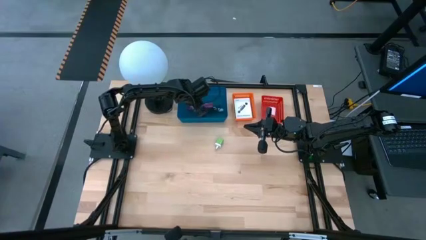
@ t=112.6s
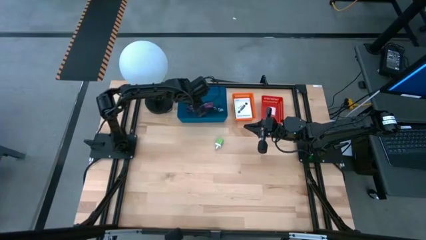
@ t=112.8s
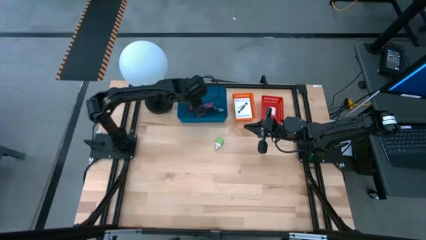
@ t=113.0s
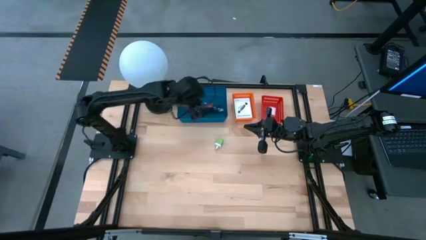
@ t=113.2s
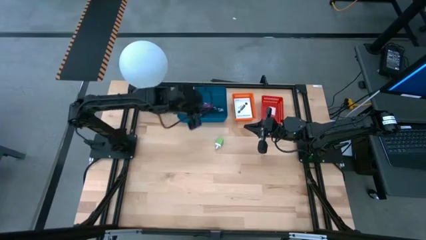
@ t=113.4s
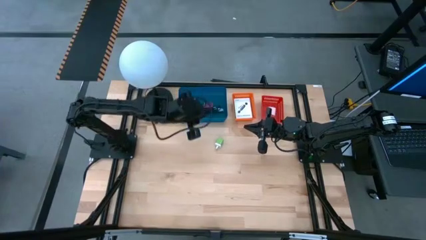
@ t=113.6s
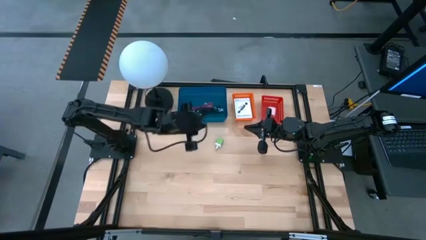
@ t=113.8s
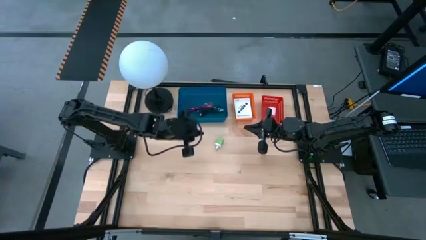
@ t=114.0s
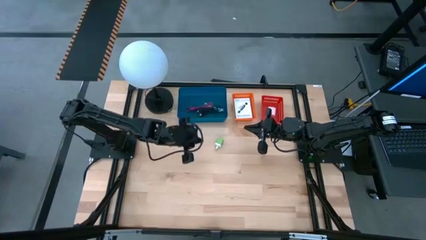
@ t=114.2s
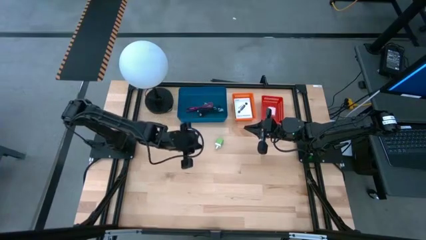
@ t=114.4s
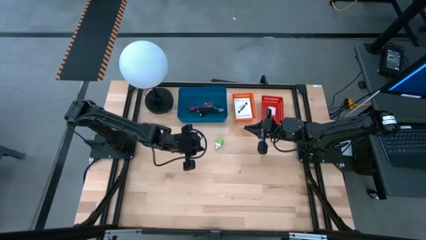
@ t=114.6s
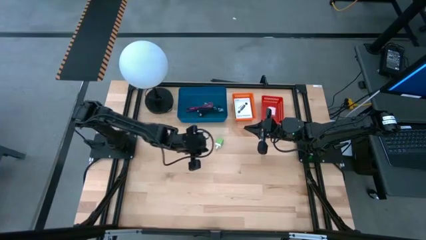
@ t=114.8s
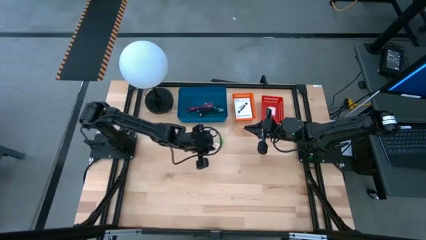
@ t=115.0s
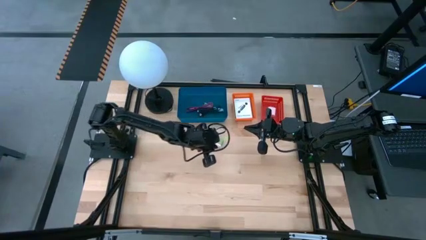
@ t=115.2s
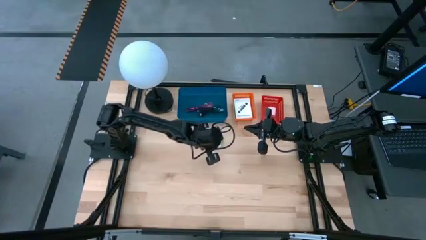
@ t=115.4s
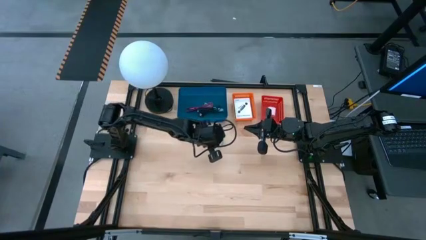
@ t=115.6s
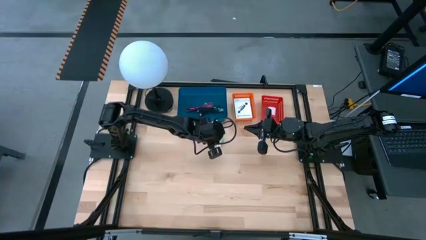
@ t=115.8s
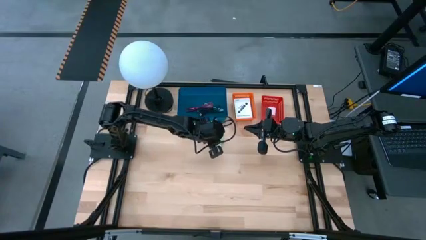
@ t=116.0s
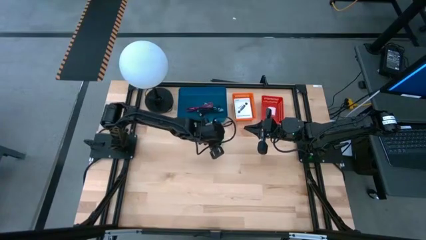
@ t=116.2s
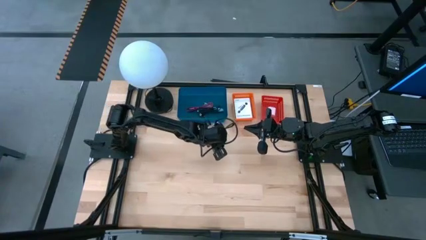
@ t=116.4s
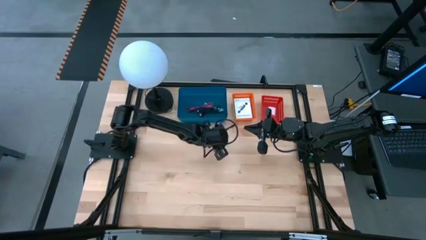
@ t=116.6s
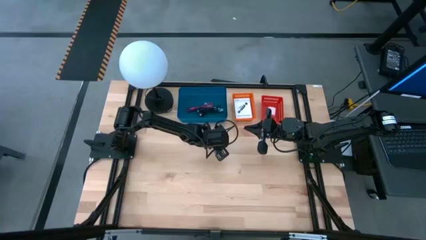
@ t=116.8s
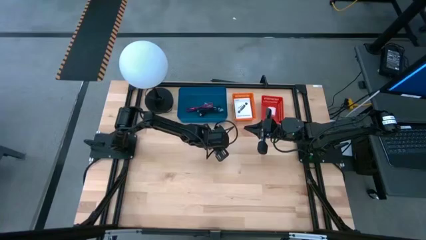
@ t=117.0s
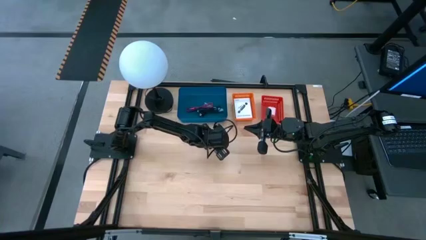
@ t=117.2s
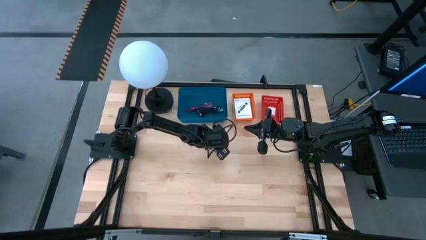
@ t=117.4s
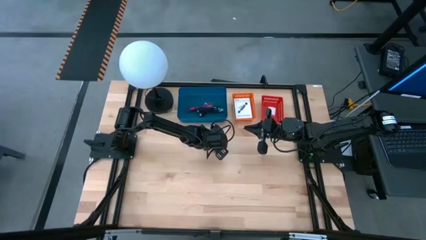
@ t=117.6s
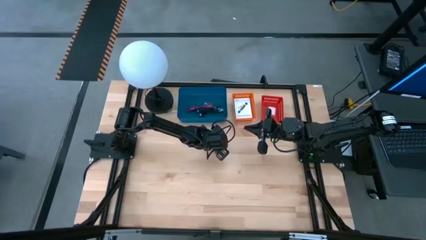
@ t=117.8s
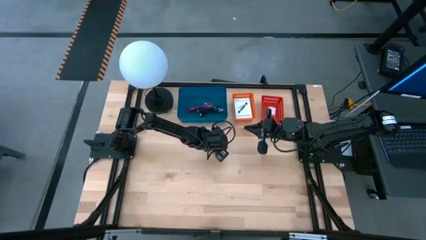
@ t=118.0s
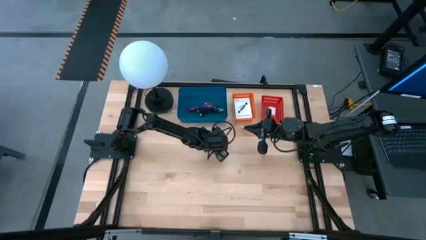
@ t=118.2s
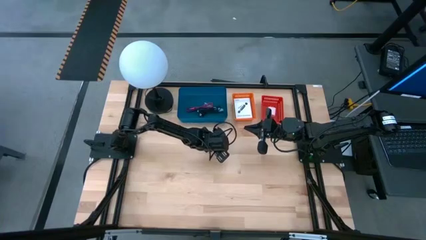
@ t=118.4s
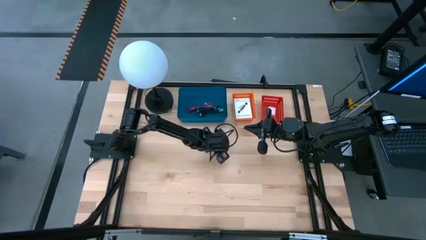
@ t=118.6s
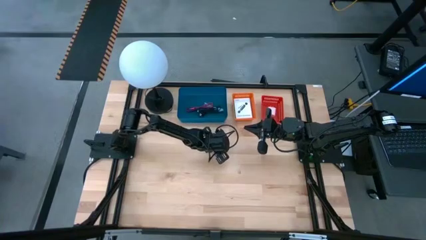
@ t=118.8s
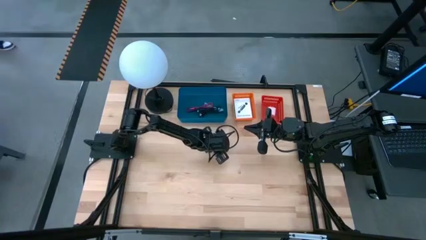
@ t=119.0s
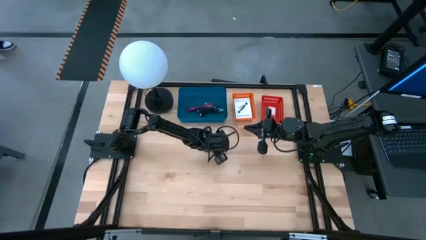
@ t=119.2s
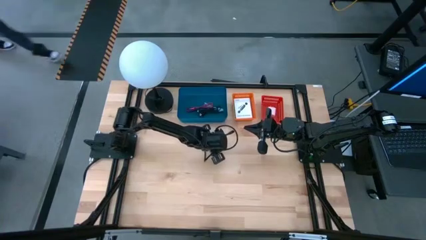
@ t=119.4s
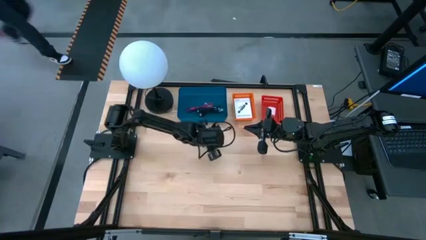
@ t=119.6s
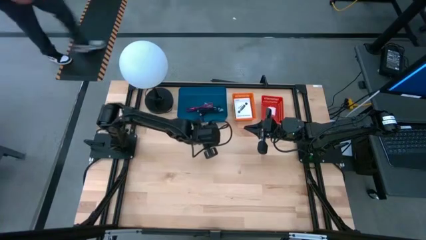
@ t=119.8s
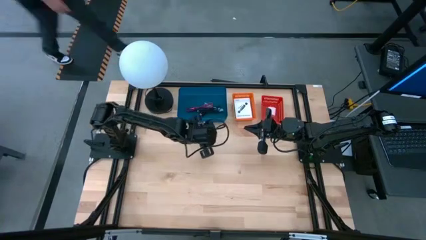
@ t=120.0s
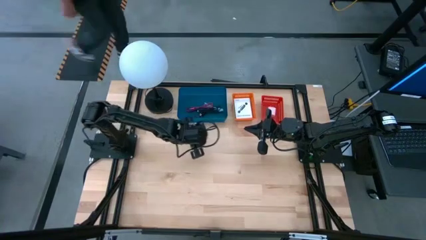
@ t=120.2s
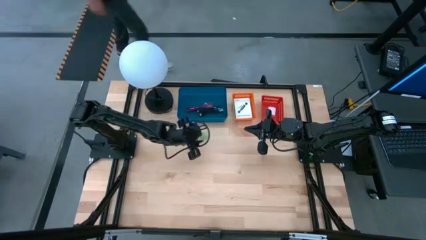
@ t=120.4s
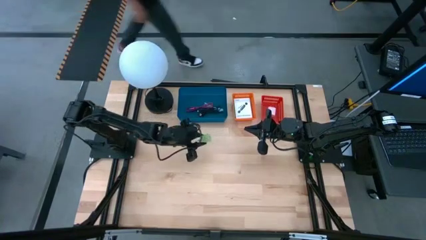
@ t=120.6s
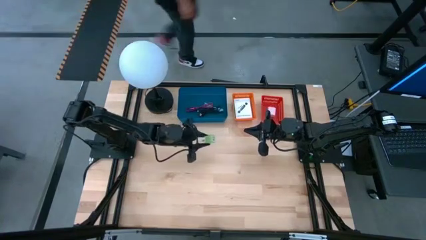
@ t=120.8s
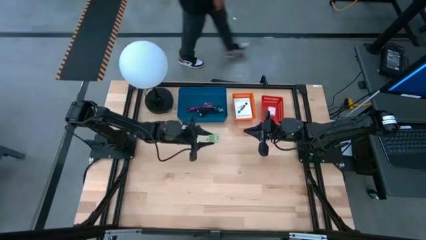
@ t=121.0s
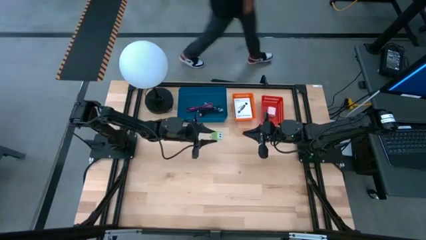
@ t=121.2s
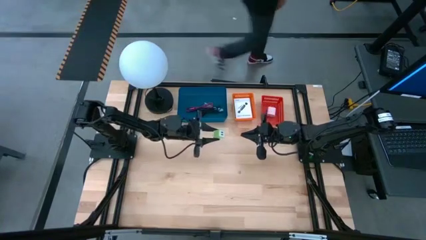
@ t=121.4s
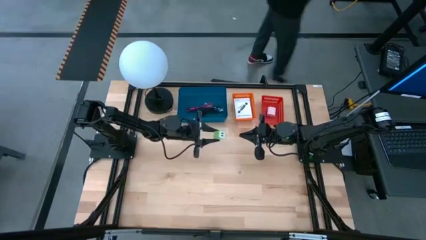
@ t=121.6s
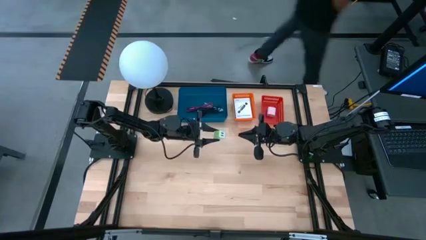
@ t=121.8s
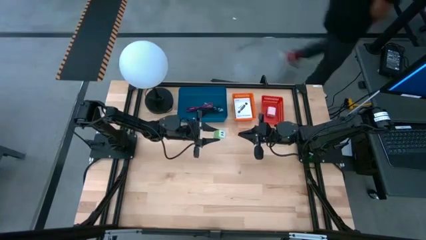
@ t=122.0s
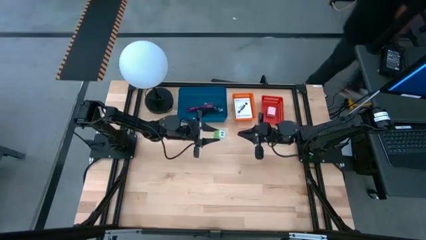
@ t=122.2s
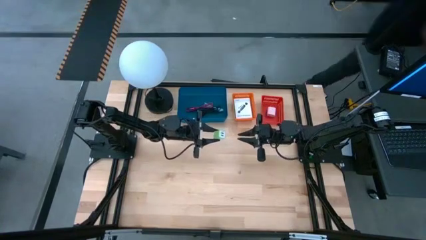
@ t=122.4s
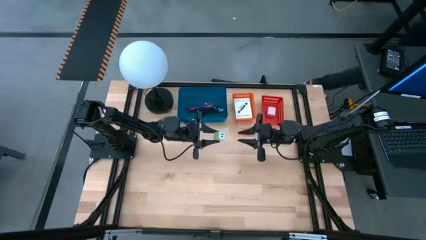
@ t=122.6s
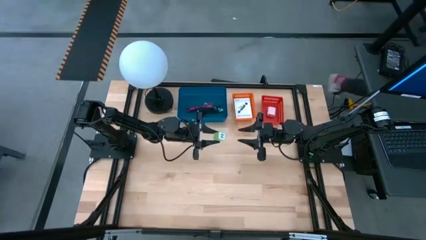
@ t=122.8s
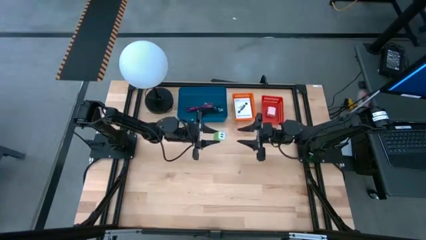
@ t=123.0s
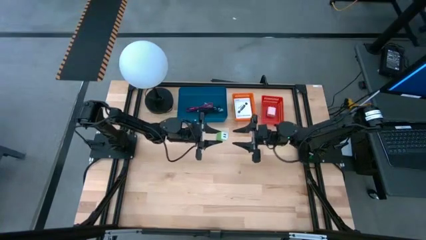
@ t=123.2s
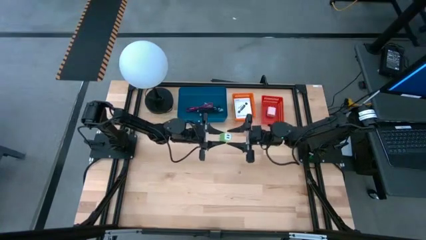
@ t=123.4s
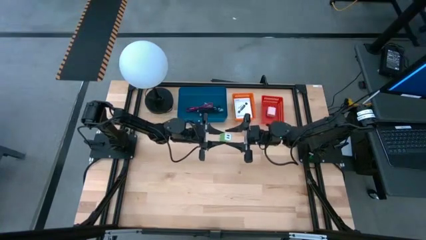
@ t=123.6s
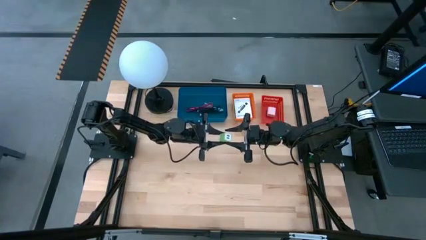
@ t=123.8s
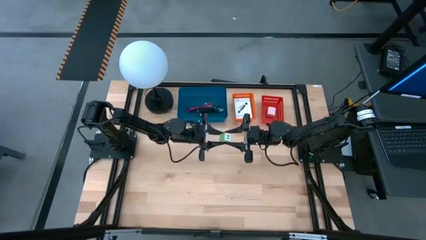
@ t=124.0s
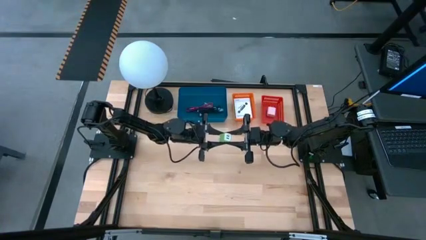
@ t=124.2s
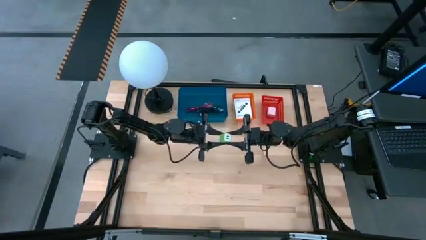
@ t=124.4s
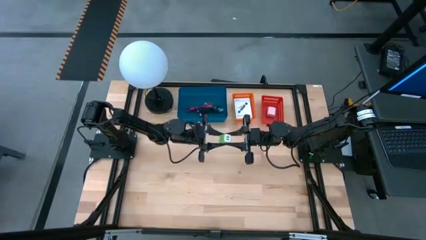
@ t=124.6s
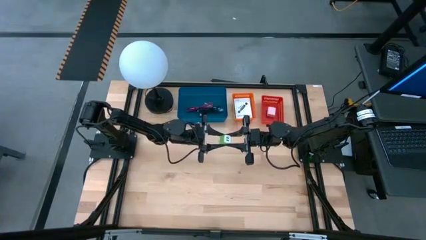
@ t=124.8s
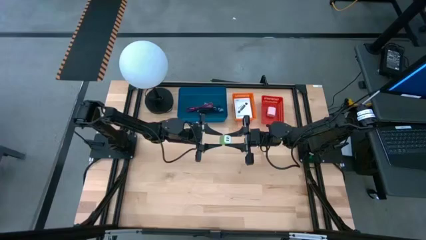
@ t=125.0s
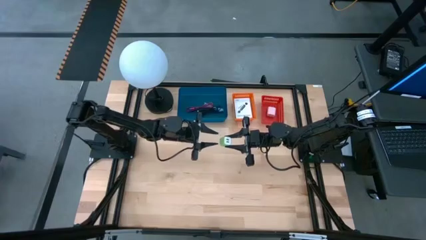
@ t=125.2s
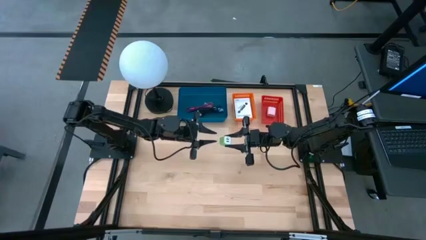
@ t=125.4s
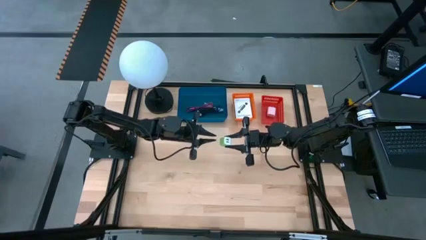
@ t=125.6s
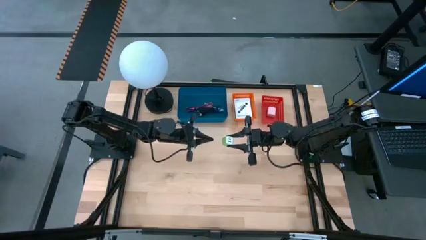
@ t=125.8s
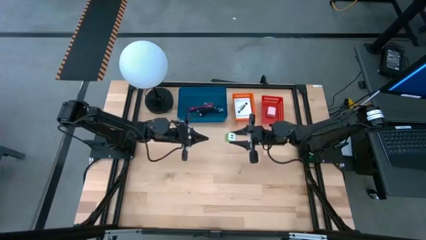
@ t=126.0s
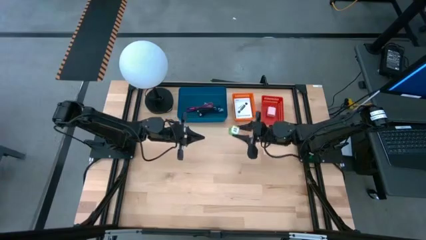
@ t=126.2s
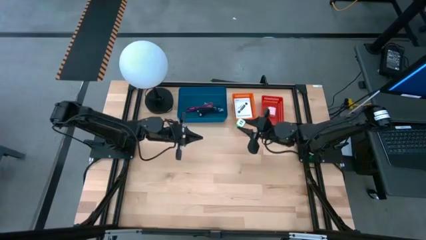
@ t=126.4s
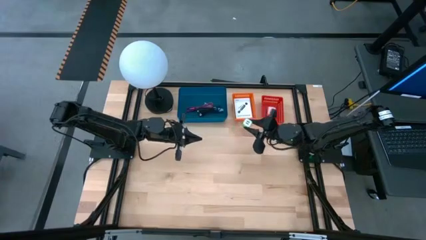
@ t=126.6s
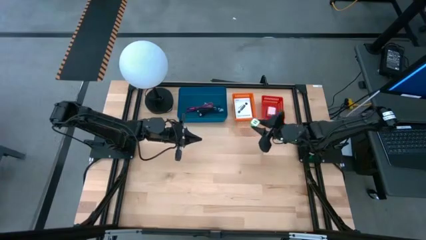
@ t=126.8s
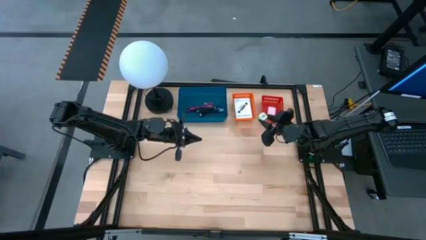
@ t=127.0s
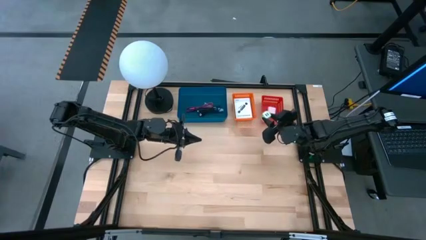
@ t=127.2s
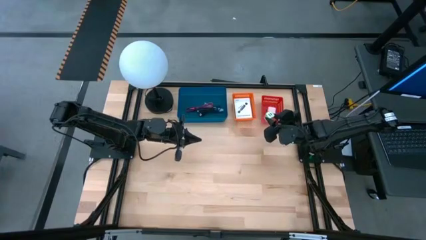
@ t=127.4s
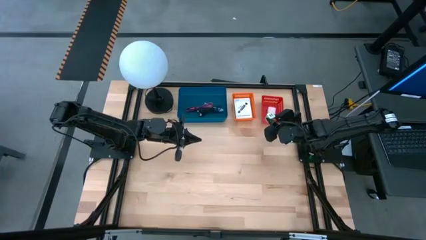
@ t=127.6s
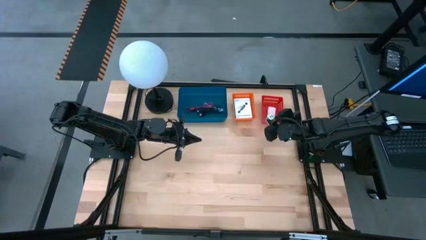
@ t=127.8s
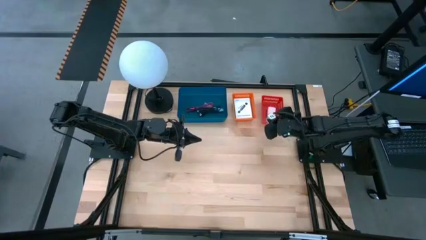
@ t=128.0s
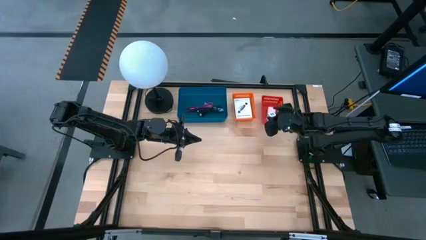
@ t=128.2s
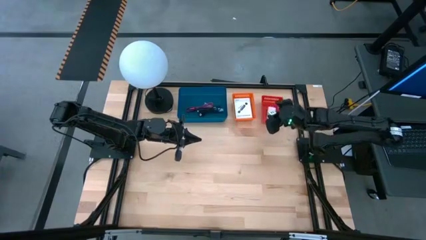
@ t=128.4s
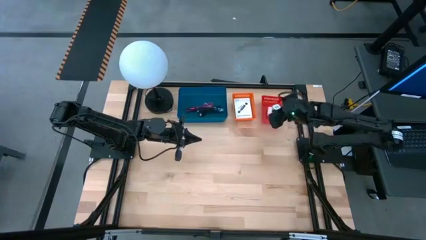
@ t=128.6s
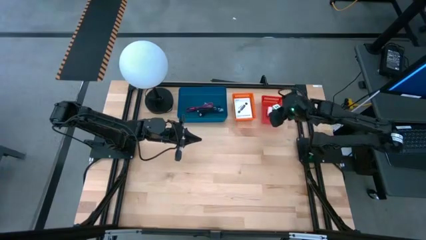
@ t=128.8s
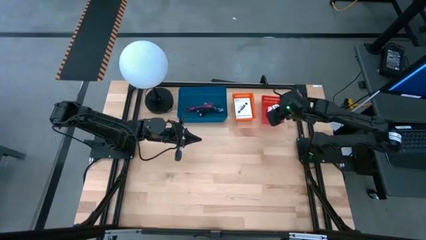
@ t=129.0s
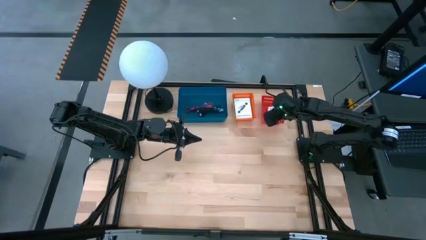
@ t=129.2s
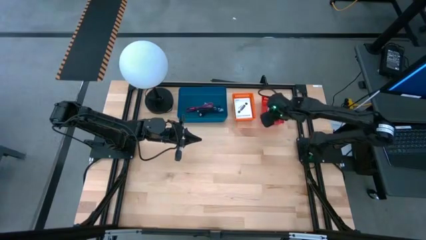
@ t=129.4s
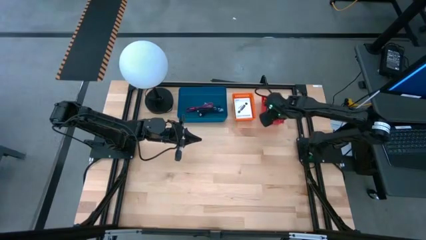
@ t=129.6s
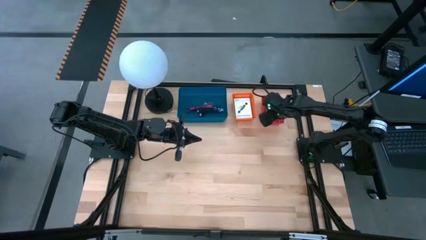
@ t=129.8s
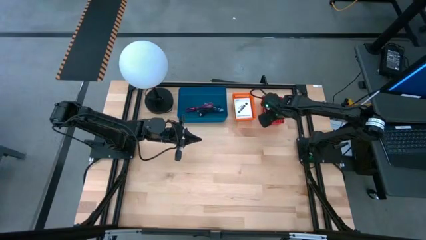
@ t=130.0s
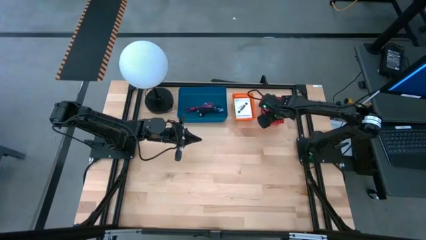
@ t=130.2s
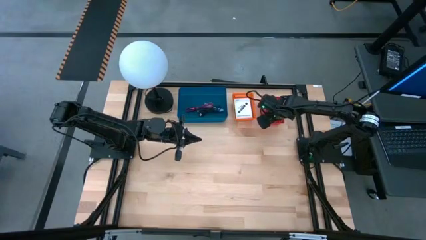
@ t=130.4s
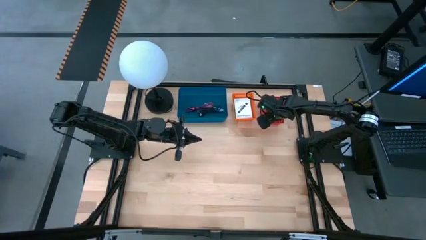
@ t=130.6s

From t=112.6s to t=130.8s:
Task: Pick and place items into bin
Put the light green charger adapter into the red bin
